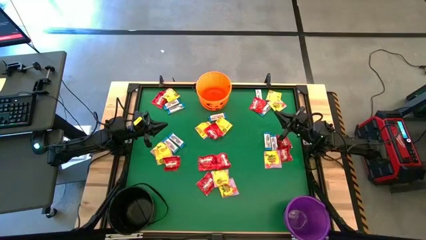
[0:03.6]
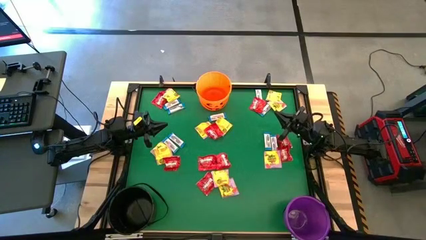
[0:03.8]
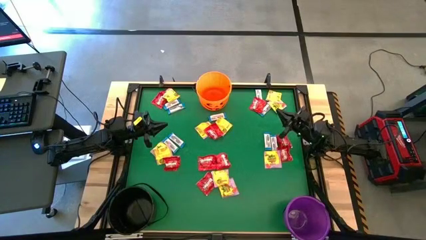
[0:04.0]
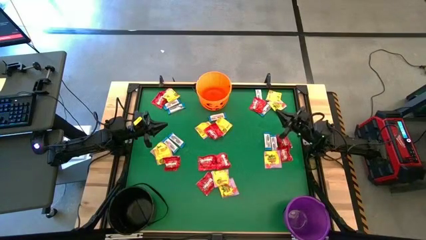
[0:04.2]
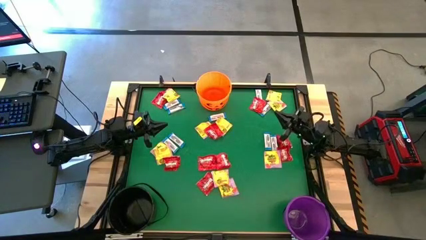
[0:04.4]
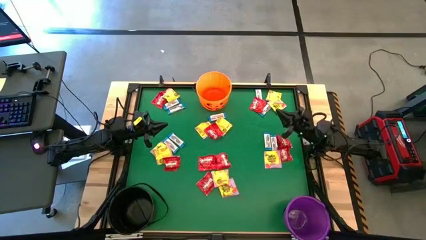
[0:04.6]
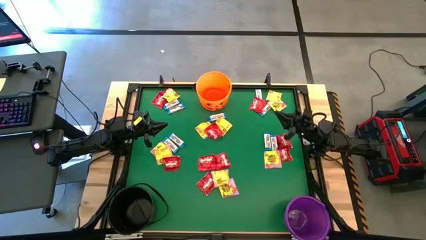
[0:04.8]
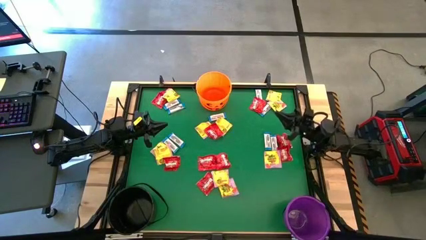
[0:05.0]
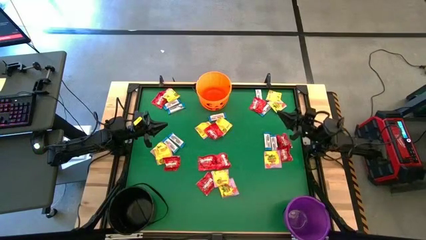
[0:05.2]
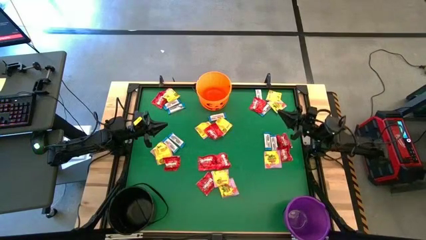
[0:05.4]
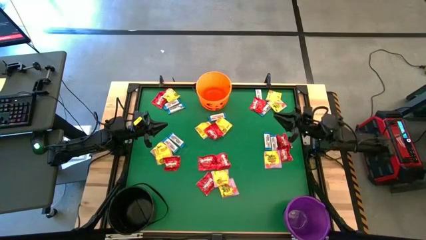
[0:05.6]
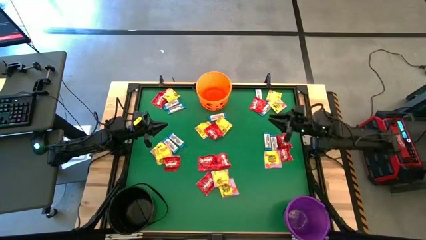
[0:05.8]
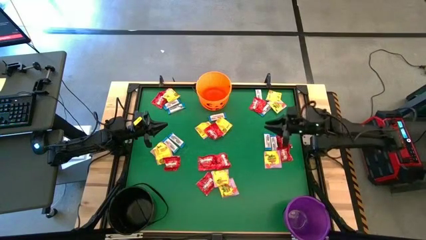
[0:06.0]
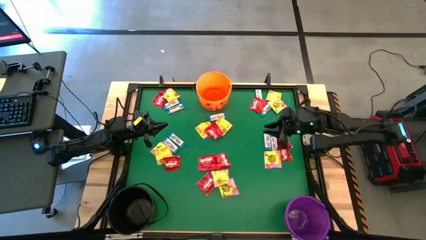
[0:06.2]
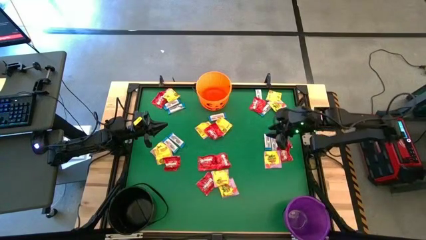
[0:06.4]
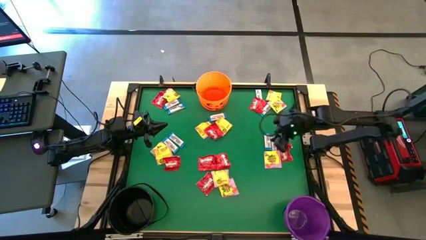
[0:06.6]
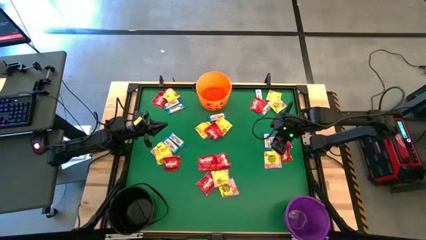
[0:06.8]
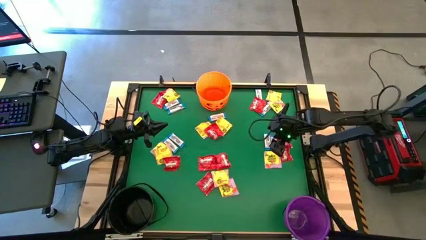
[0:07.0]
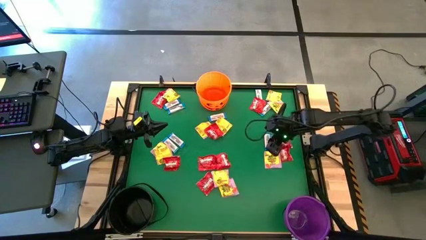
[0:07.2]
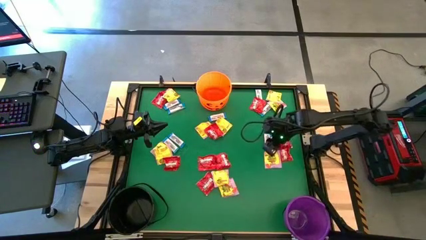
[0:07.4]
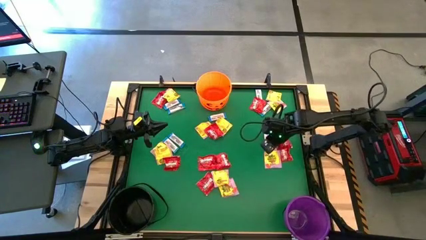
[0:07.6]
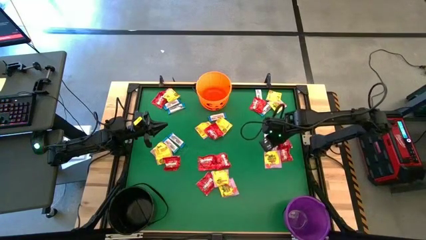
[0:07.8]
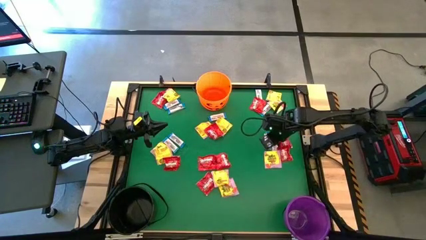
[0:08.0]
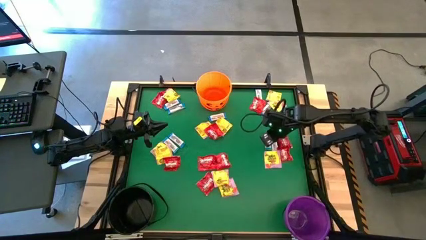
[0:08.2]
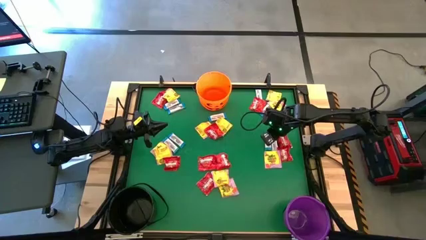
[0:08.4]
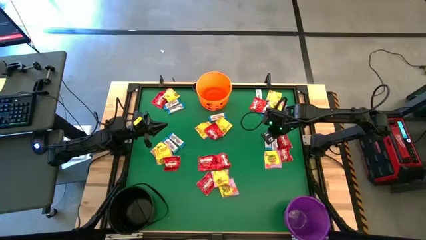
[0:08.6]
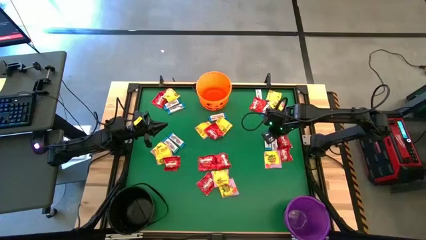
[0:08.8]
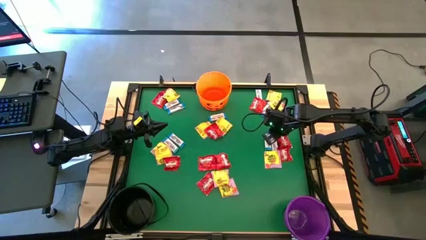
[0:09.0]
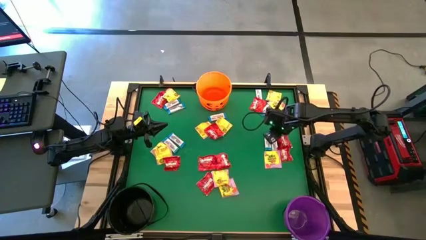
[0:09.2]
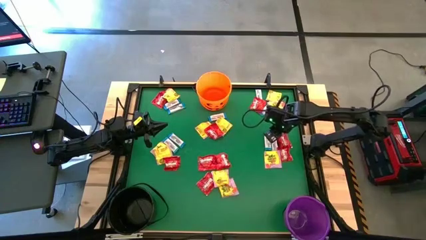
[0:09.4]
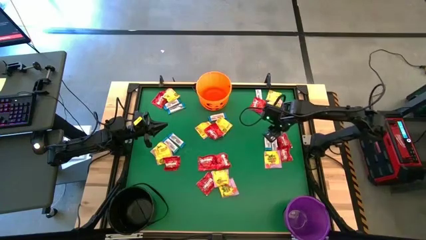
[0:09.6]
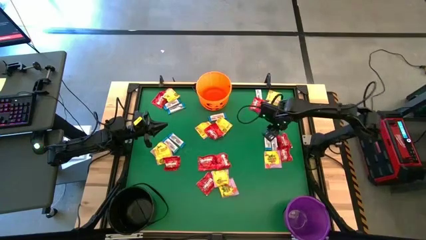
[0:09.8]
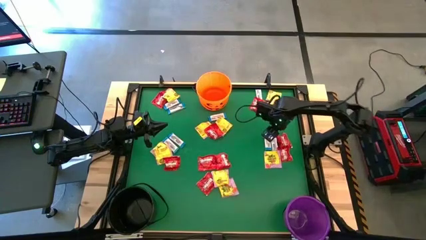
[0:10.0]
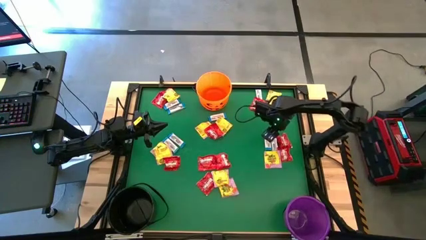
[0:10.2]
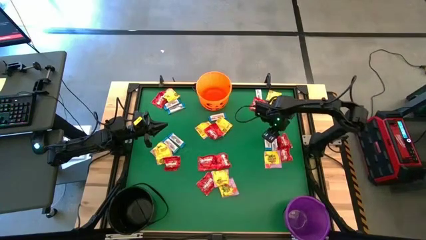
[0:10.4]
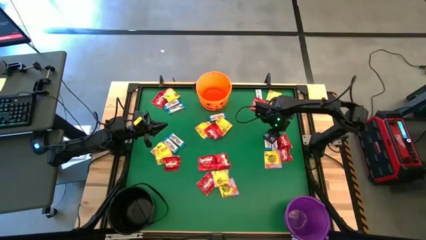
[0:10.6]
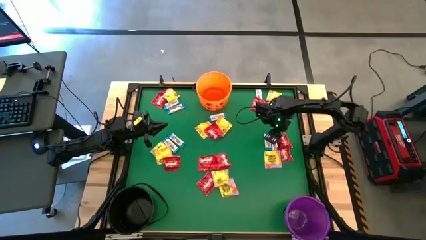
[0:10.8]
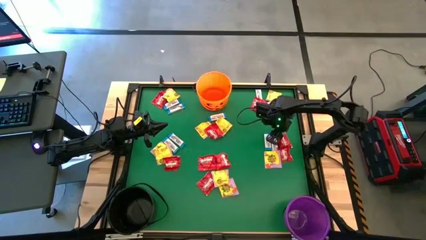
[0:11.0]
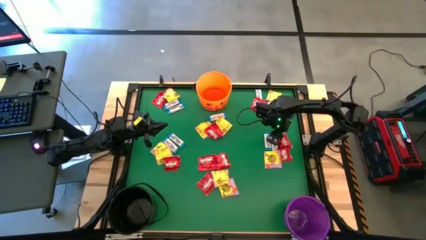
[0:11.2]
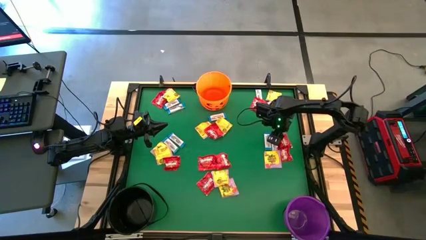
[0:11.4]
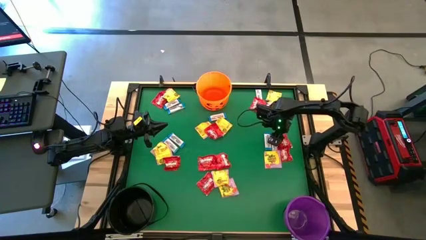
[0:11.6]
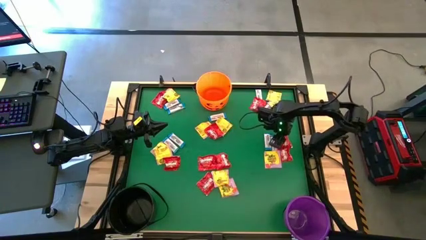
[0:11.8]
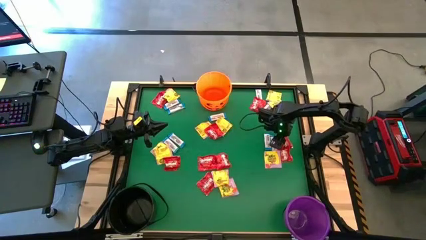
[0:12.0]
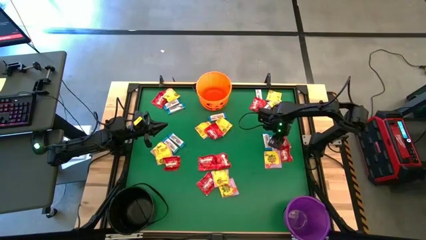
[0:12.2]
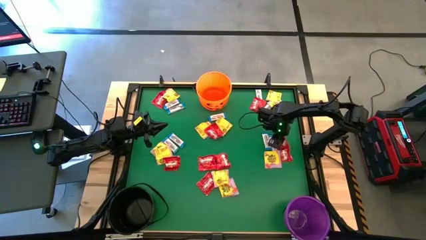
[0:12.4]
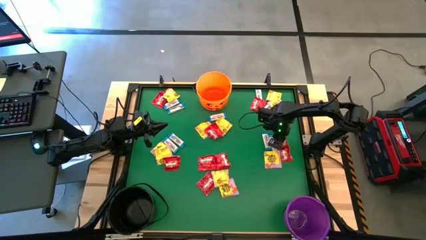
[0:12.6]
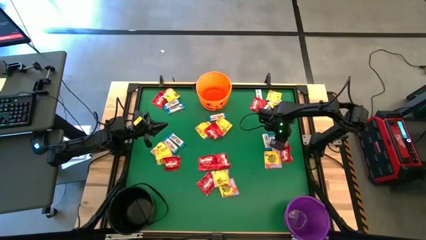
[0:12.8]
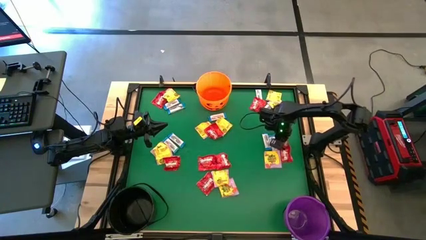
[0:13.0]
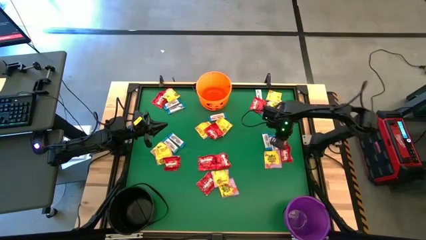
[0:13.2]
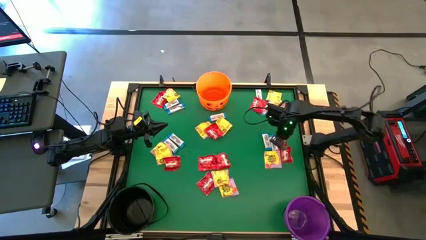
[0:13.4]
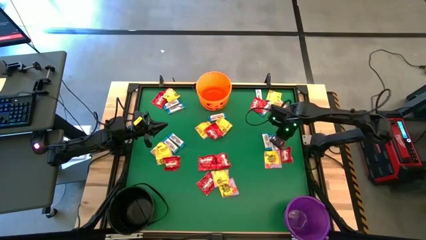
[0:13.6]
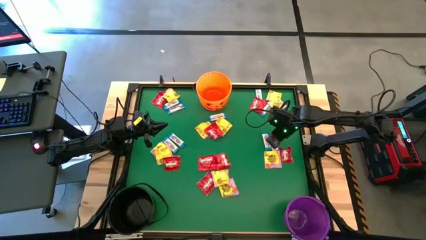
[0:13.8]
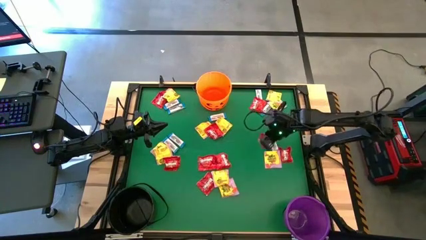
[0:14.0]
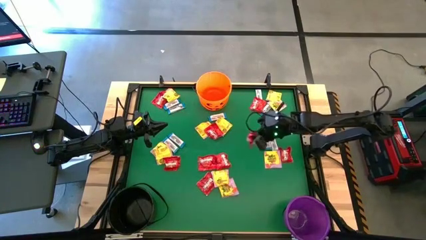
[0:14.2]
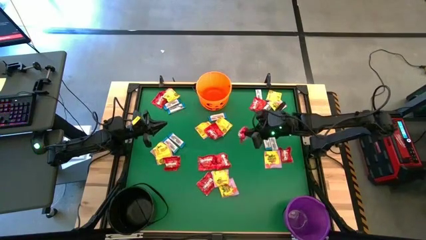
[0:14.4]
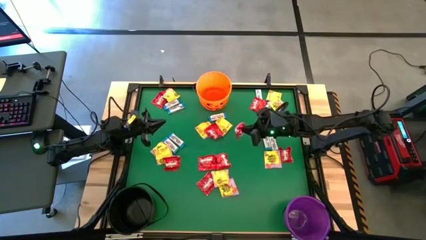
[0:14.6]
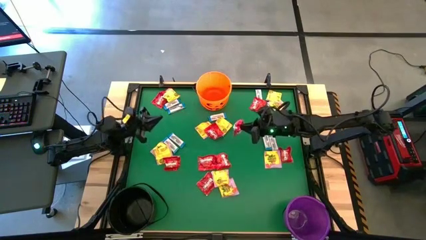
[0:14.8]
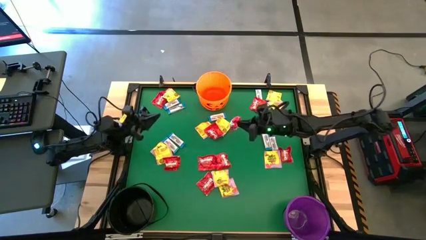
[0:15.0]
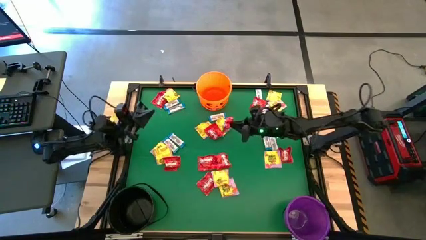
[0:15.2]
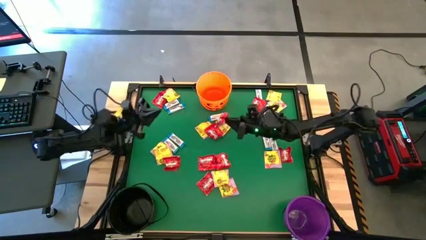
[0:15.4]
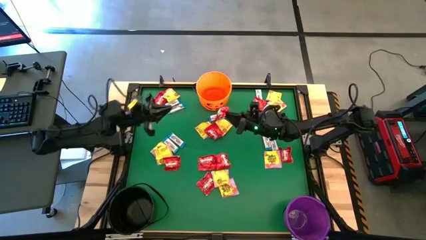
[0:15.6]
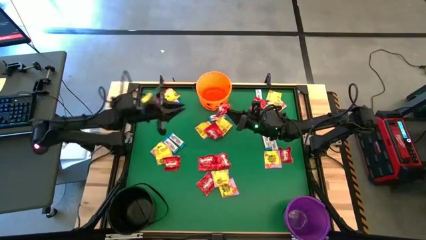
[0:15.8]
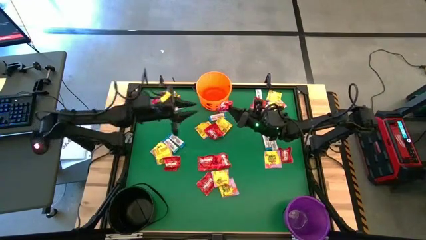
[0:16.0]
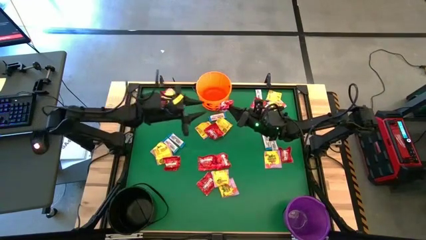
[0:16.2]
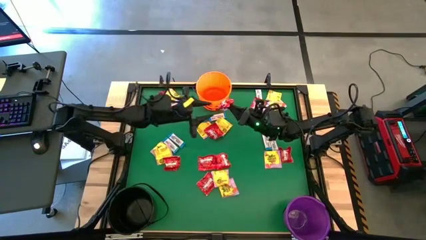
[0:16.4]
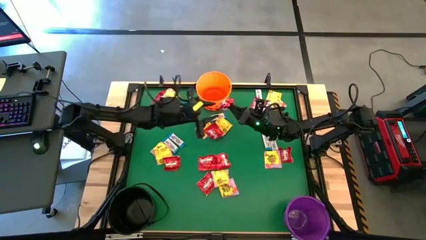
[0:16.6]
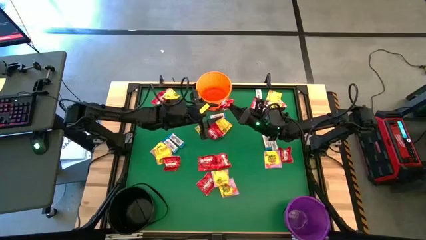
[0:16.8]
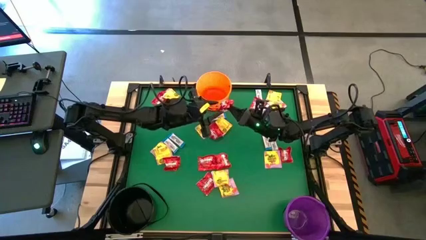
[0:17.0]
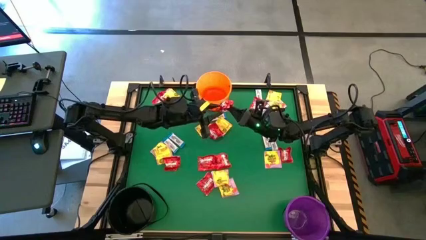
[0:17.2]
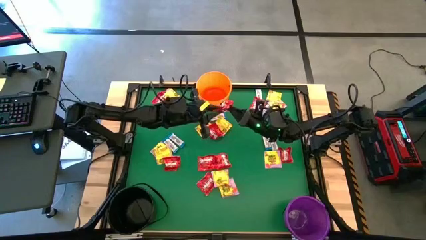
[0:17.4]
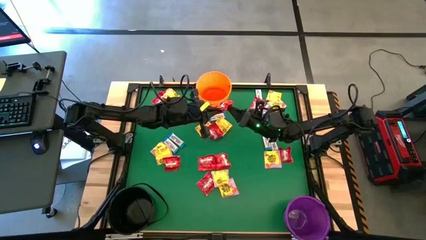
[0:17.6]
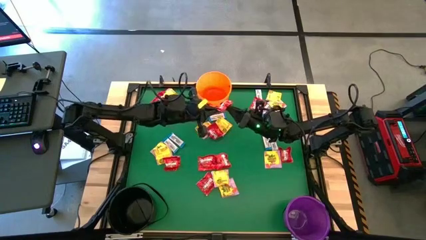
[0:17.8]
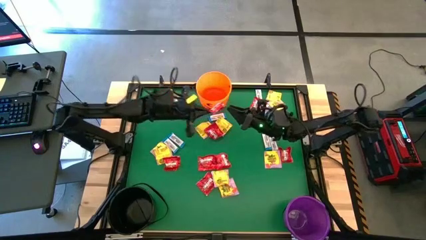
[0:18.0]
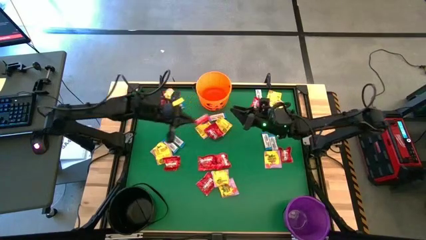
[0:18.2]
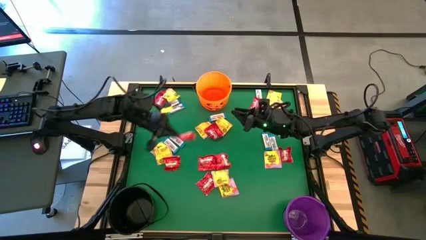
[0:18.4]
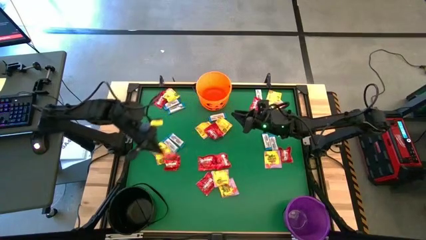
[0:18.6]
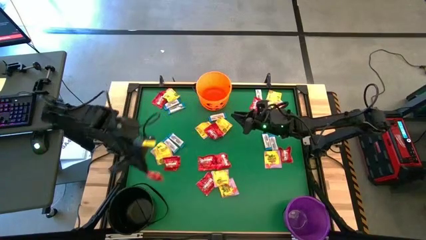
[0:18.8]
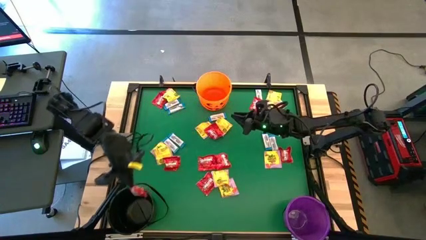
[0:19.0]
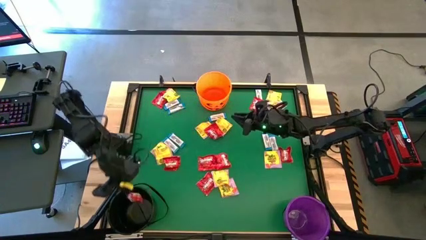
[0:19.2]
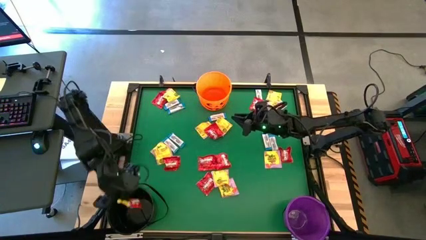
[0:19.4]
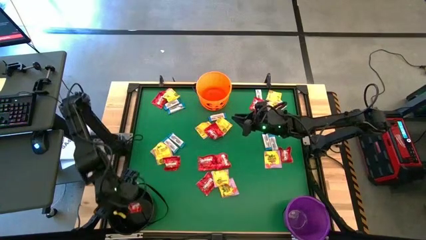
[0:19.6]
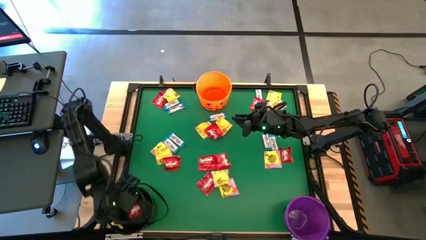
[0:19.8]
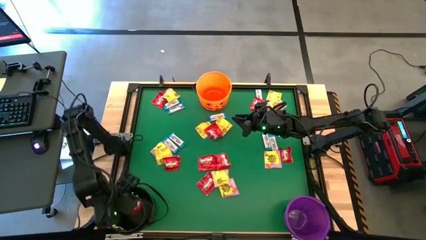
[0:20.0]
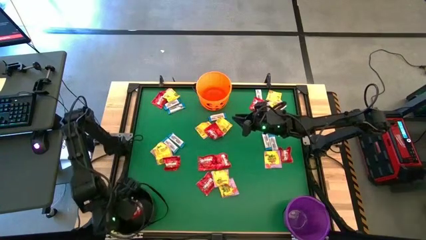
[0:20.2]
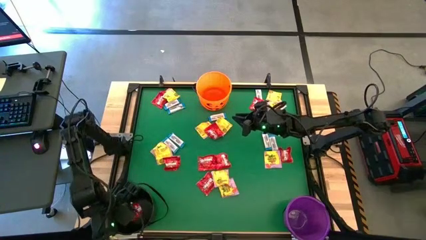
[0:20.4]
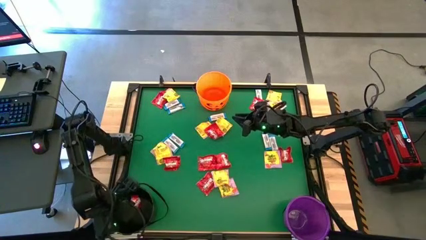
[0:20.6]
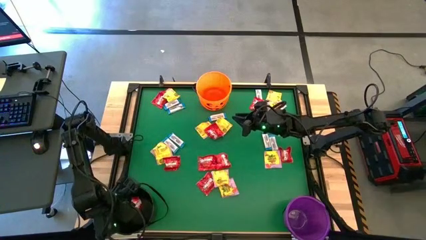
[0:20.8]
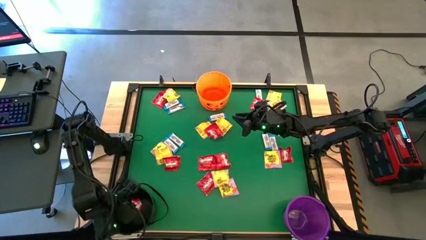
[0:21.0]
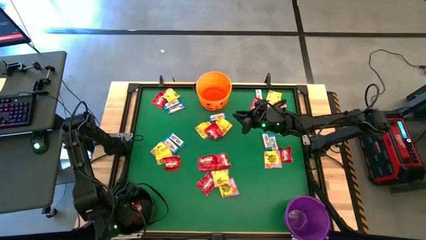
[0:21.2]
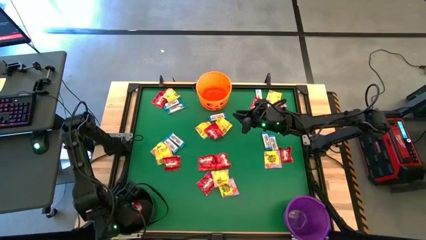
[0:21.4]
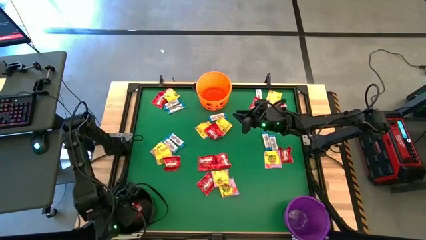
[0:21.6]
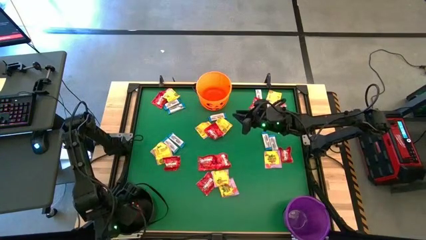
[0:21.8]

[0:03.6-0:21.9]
Task: Sort candy by brand, put in halloween buckets
Put the red candy into the black bucket
